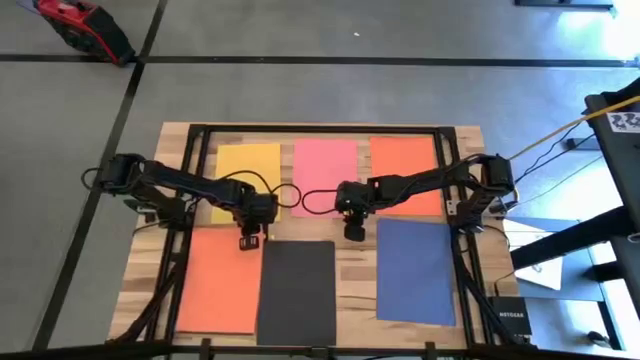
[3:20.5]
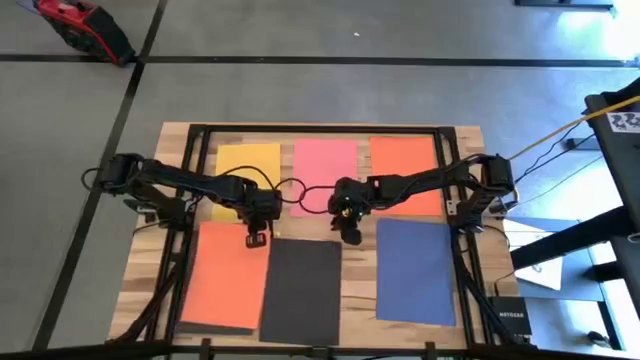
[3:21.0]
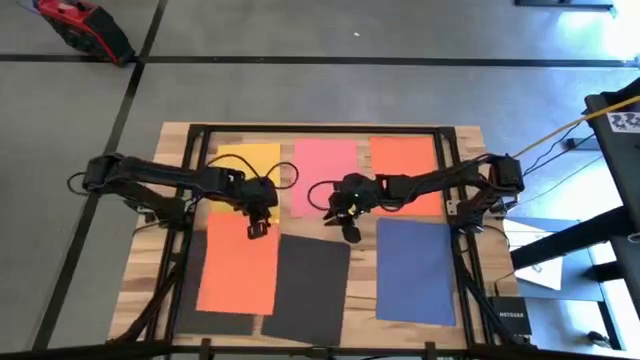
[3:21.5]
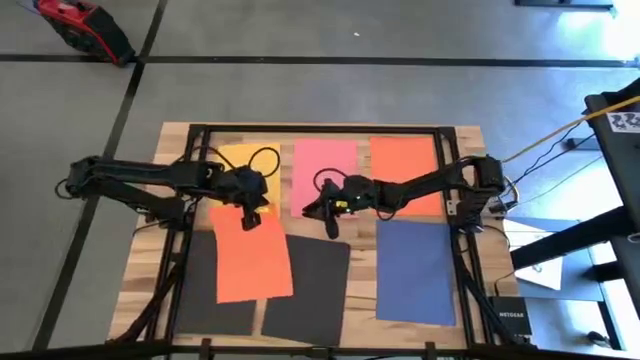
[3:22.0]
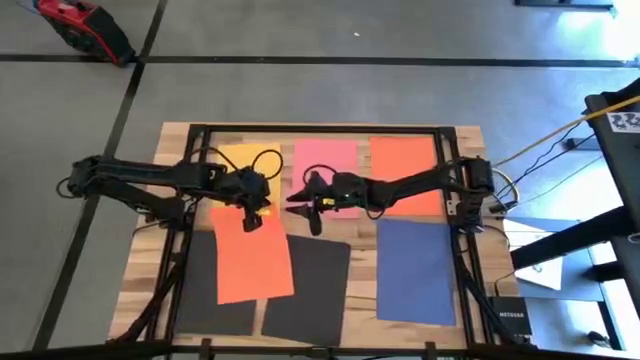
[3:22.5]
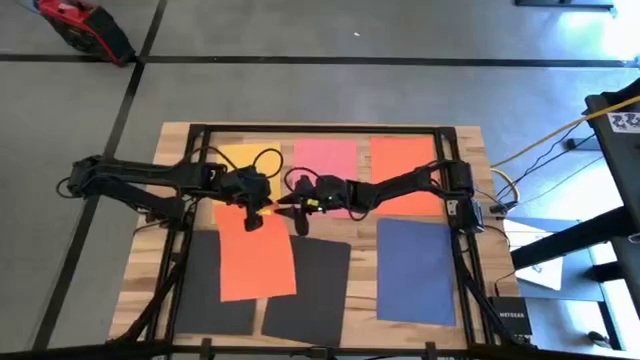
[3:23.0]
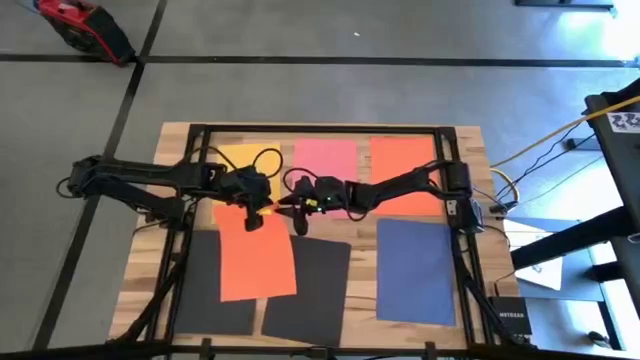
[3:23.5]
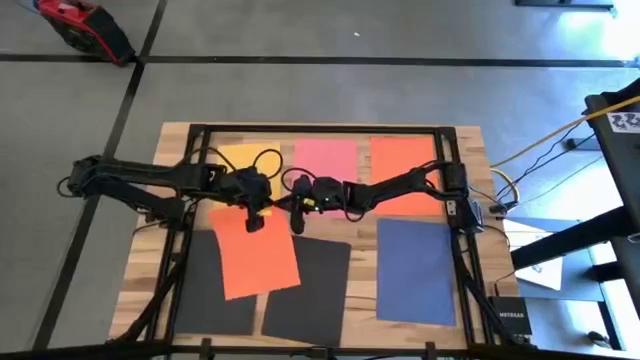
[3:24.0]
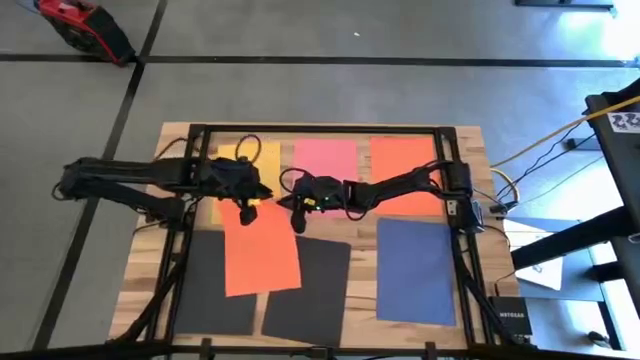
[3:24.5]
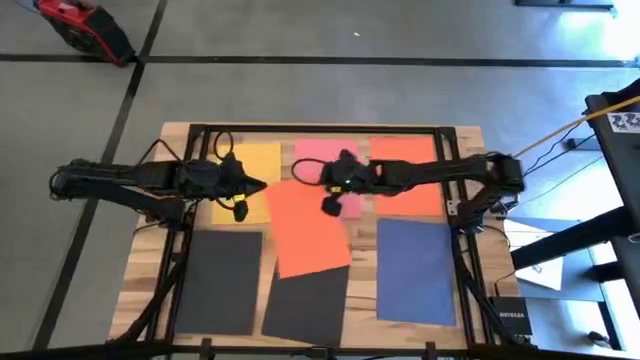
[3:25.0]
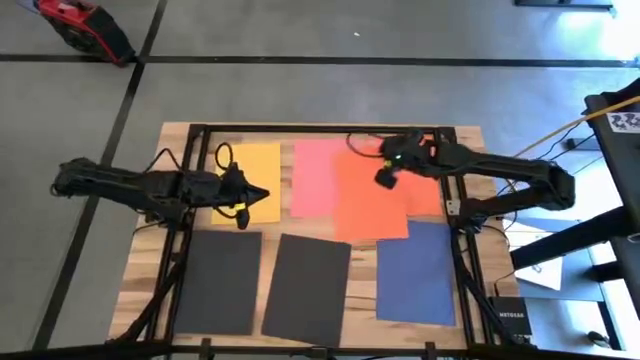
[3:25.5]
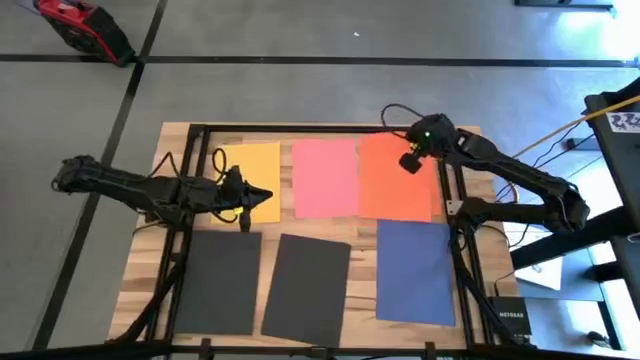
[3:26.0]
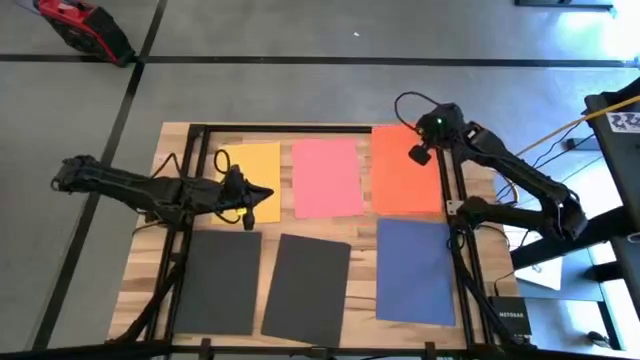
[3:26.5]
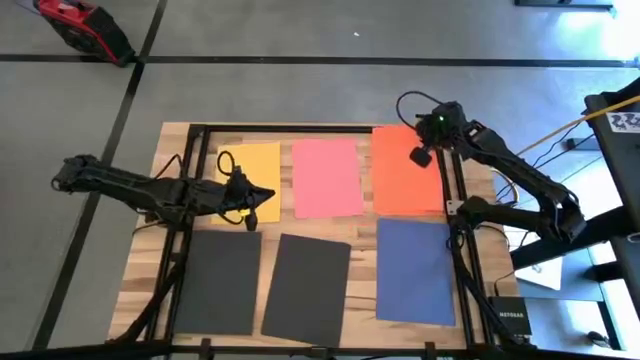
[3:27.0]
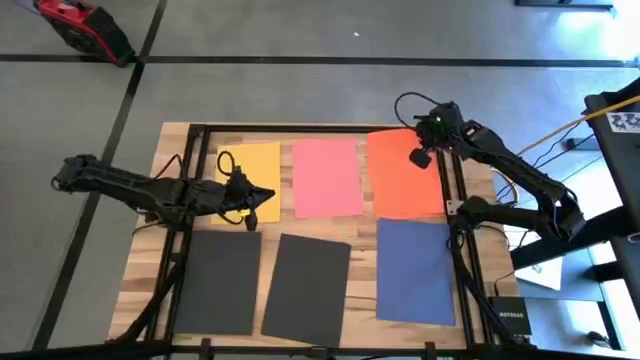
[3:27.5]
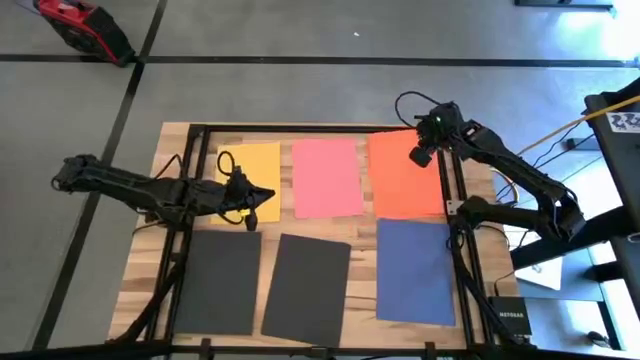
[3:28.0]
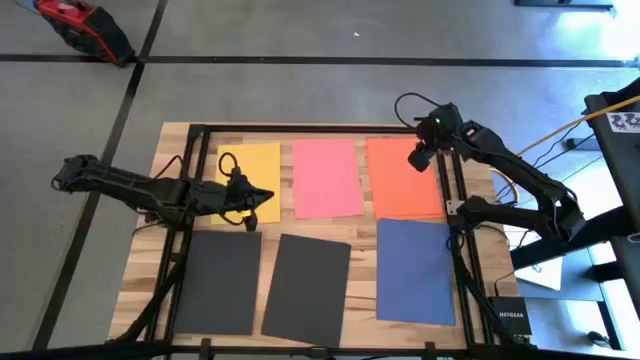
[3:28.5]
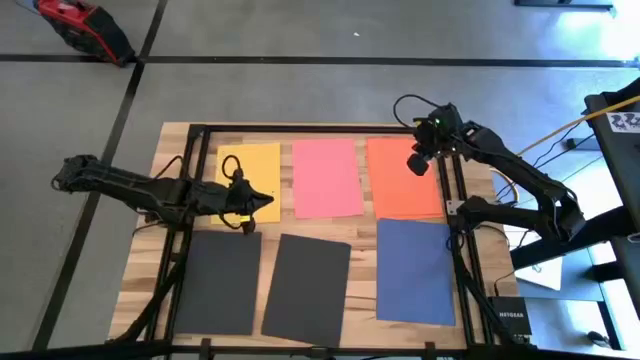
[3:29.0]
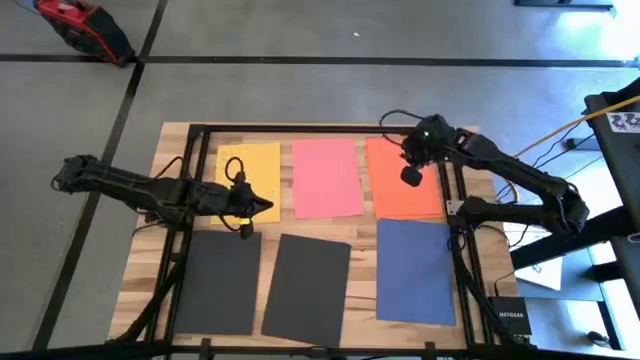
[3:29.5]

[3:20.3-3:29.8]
Task: Organize paper
Stack the orange paper on the top of the orange paper

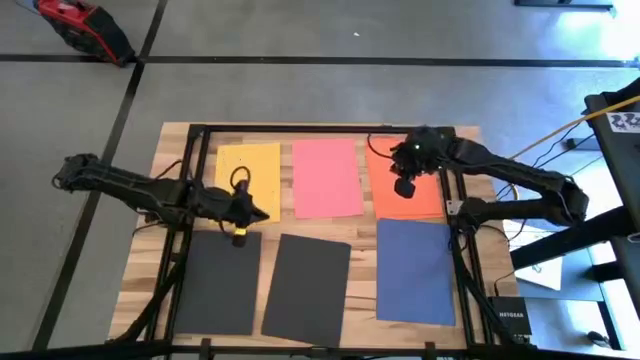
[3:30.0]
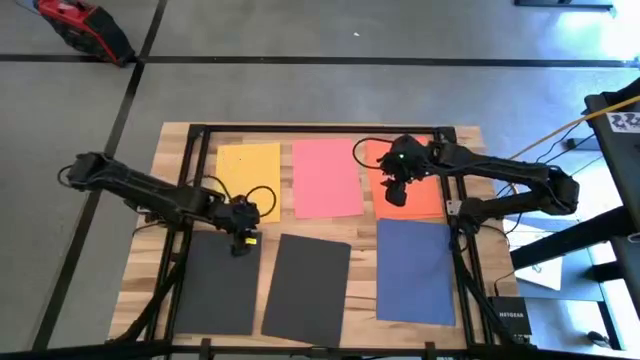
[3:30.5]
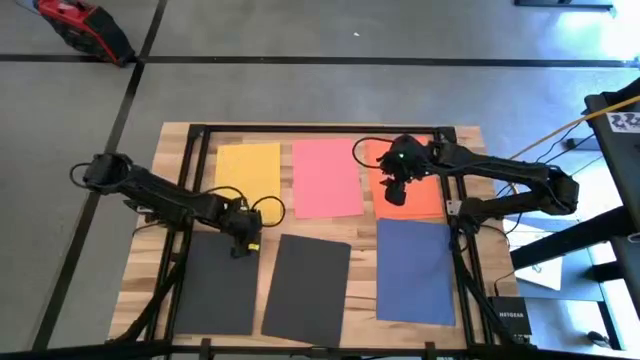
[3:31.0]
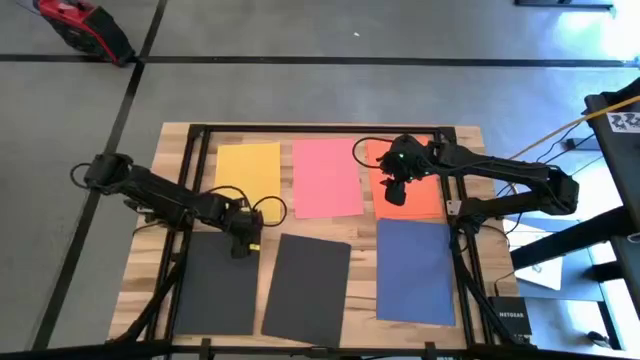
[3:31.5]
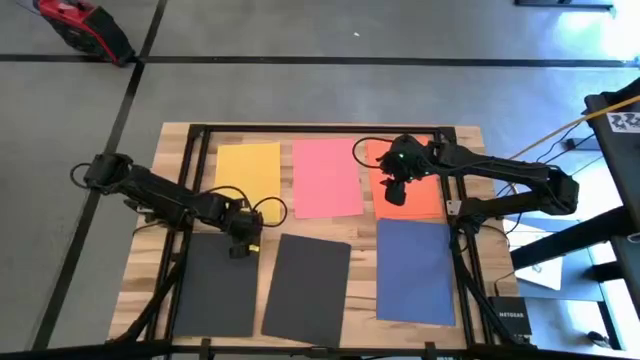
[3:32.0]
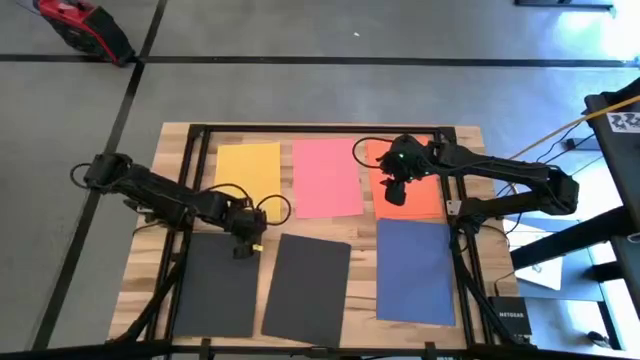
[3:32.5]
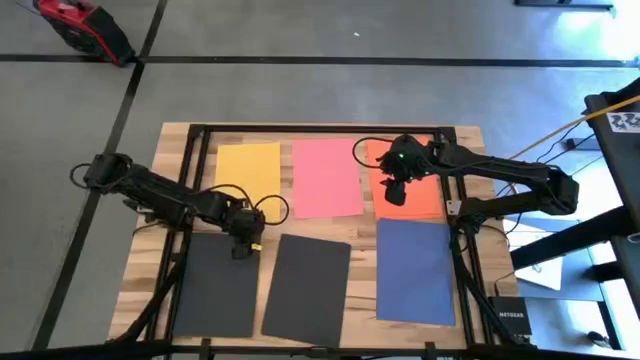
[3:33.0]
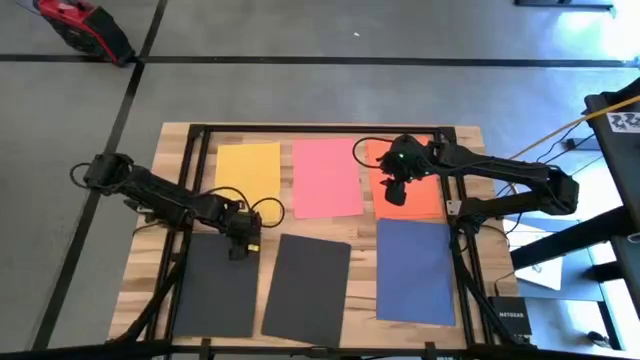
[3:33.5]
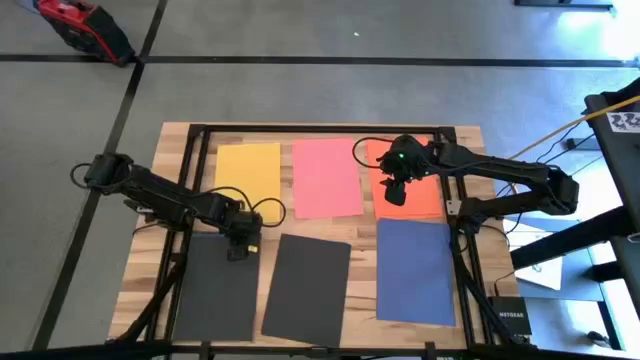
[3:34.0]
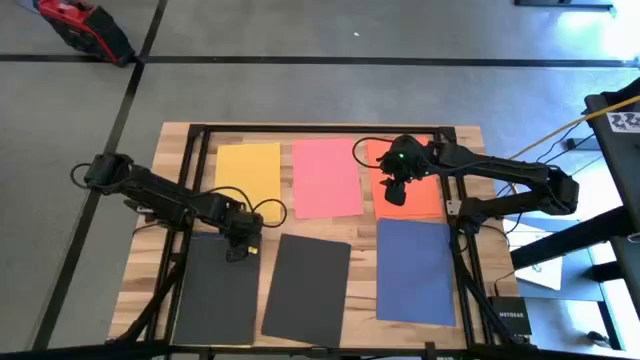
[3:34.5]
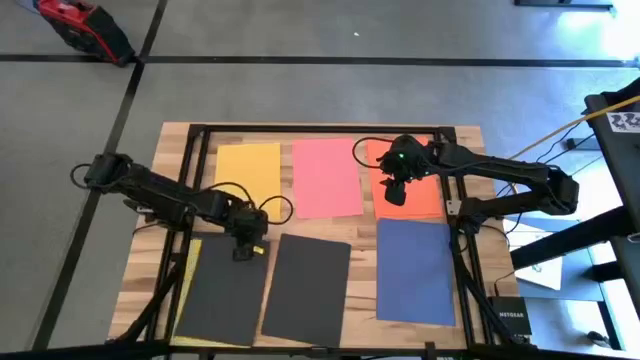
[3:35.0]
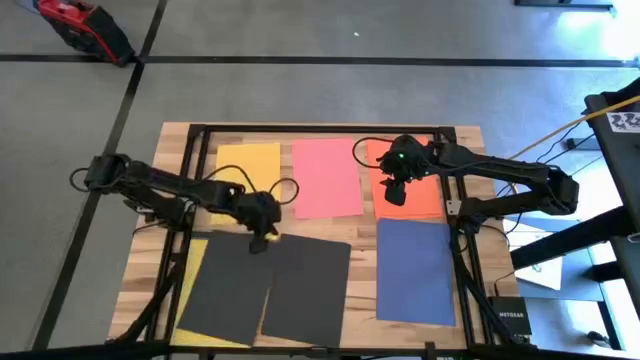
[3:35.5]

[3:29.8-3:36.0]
Stack the black paper on the top of the black paper

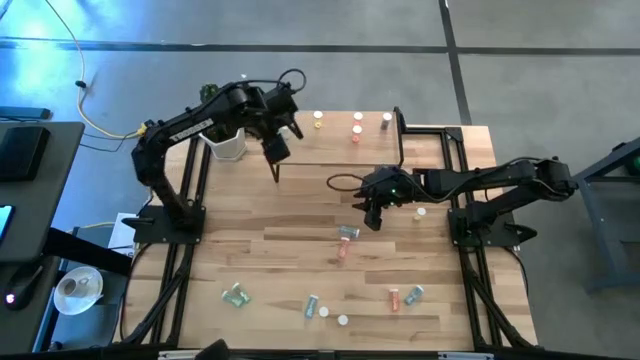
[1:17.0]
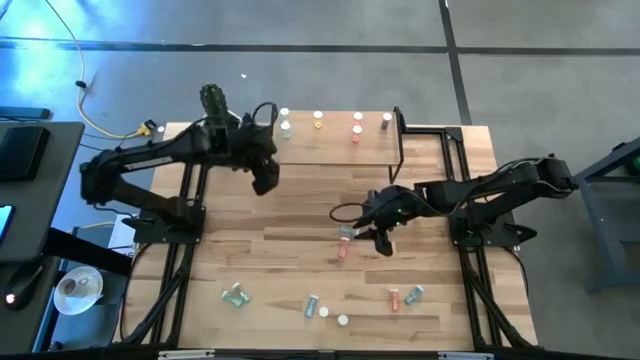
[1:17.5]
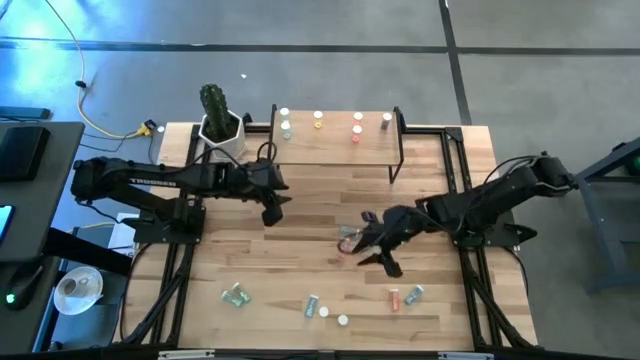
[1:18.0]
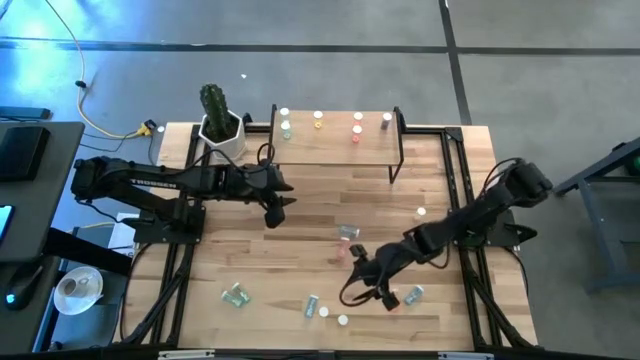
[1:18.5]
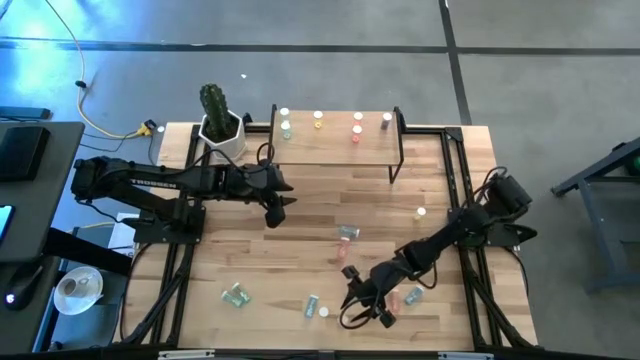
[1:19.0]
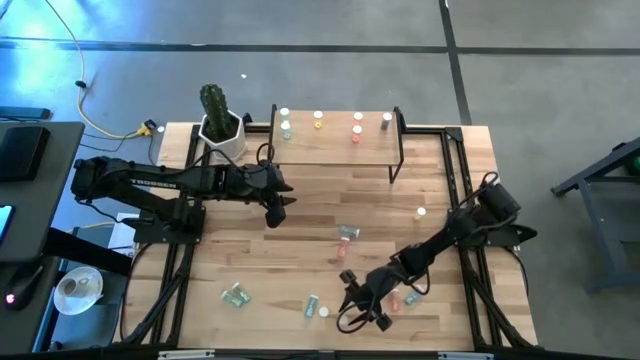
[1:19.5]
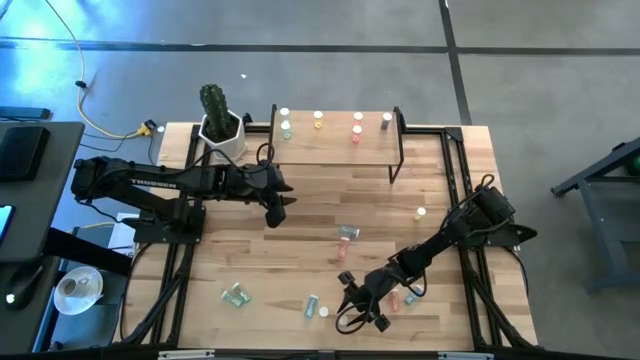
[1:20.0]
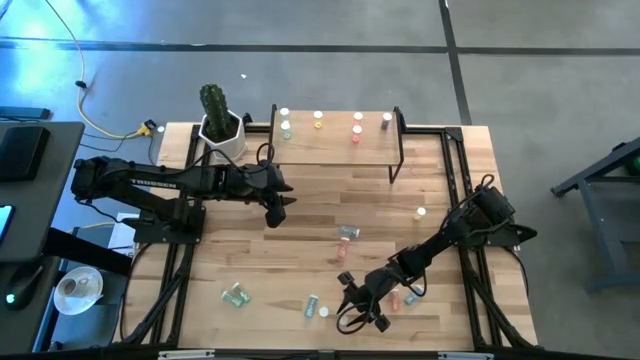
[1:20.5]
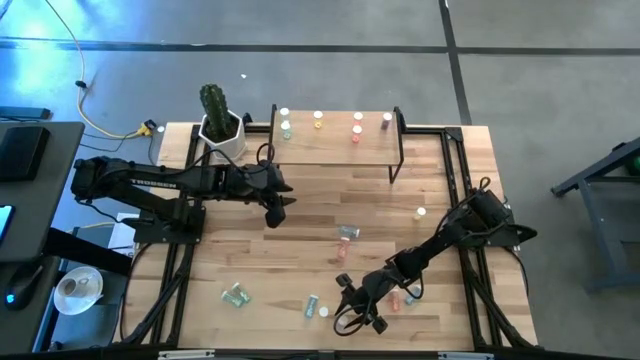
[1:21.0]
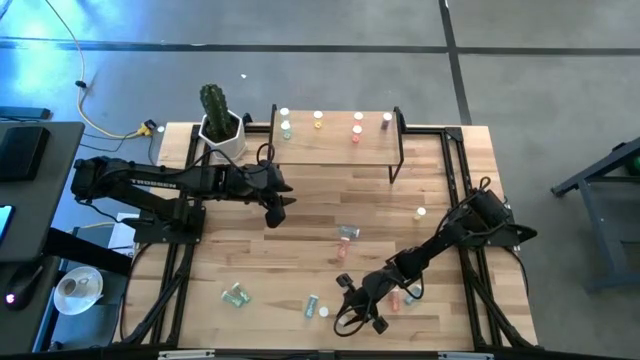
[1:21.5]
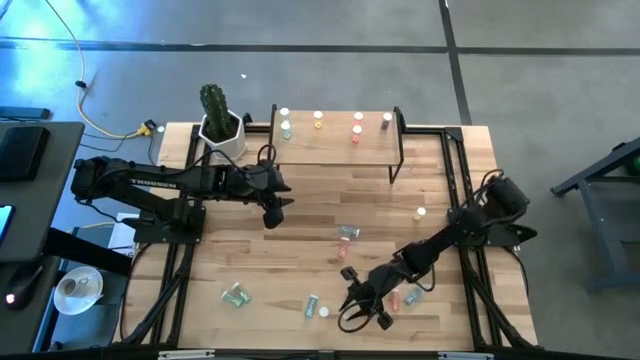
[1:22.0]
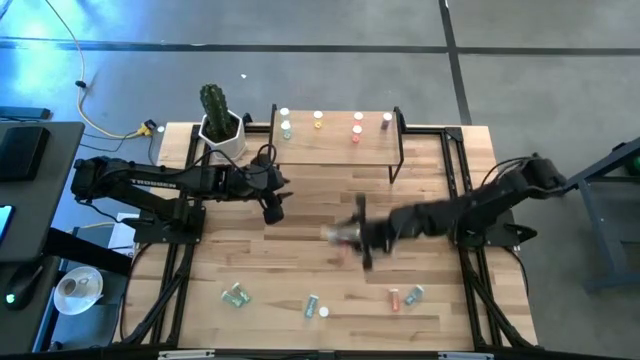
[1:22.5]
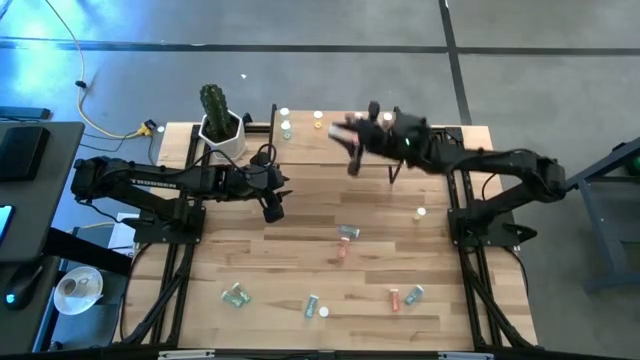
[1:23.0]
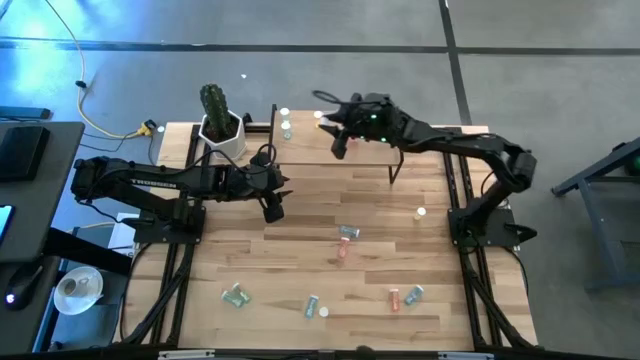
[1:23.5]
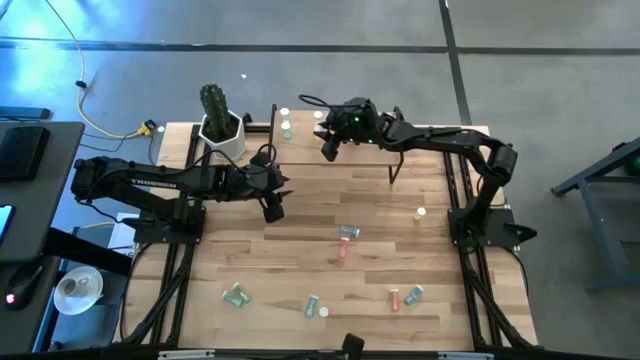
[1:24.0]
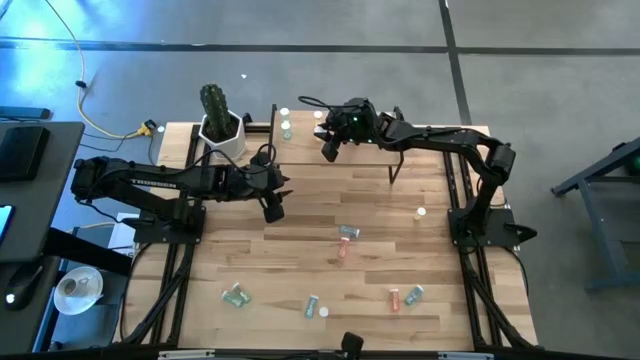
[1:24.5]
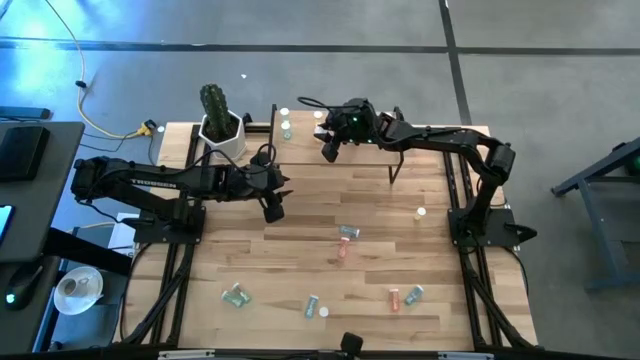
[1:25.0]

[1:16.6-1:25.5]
Task: Pick and place medicine bottles onto shelf by color
Put the yellow pill bottle on the shelf aligned with the other yellow pill bottle
